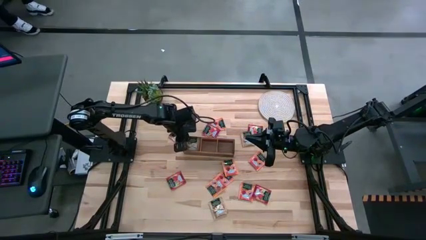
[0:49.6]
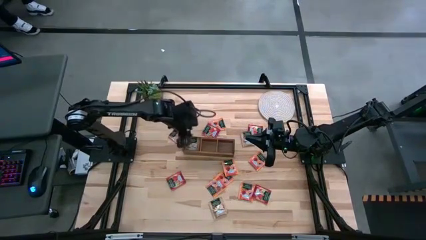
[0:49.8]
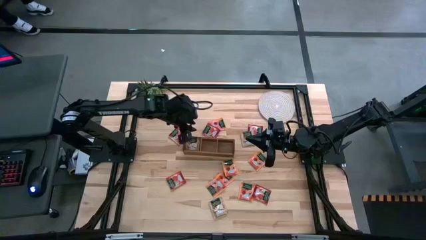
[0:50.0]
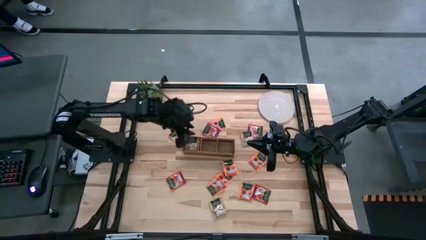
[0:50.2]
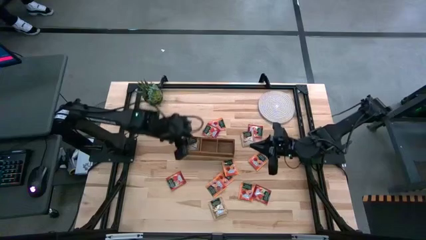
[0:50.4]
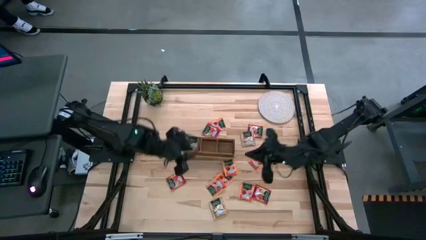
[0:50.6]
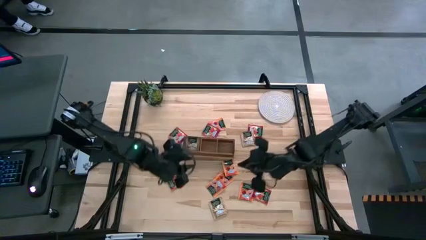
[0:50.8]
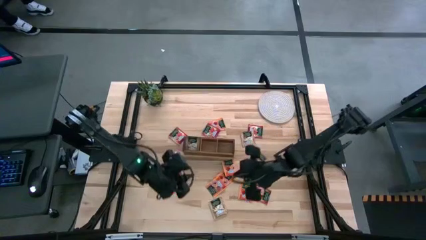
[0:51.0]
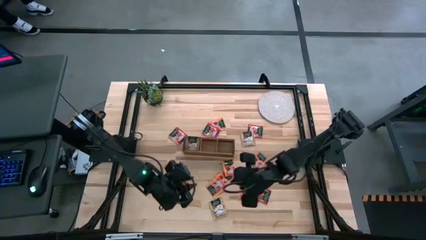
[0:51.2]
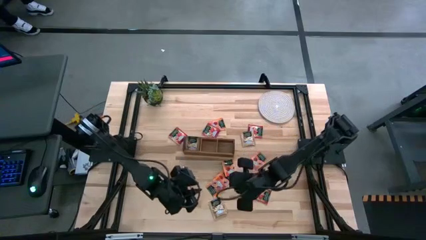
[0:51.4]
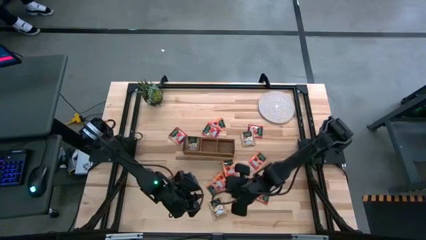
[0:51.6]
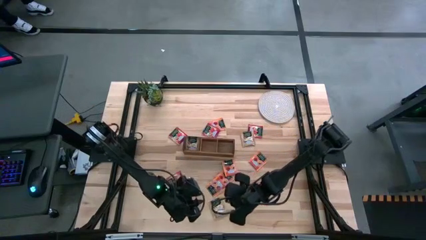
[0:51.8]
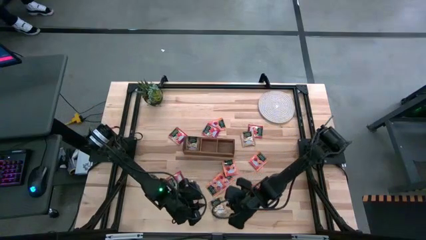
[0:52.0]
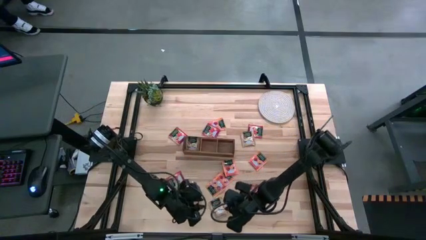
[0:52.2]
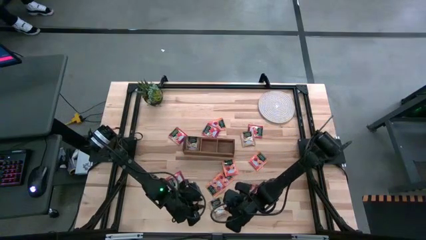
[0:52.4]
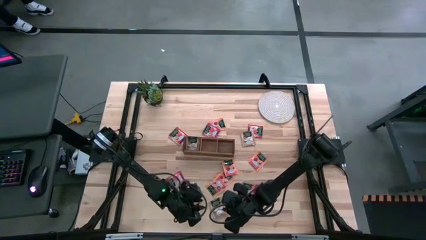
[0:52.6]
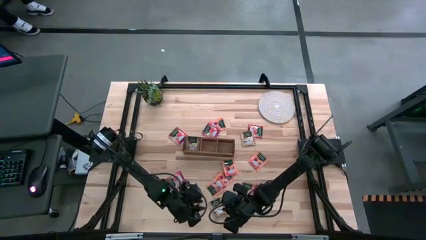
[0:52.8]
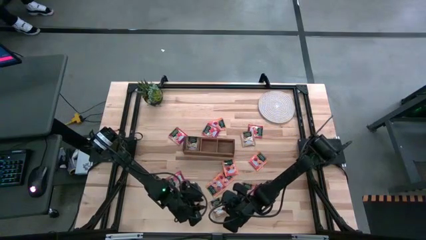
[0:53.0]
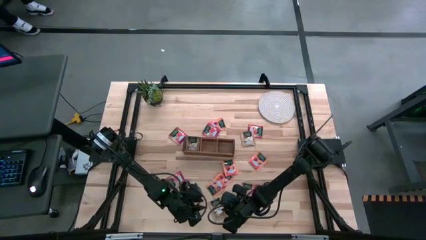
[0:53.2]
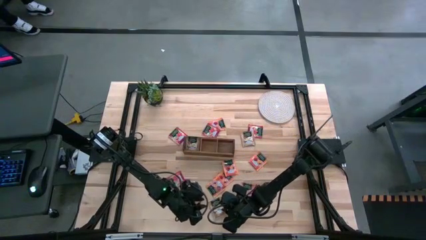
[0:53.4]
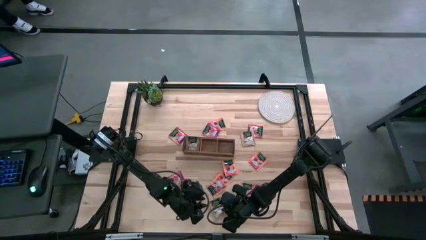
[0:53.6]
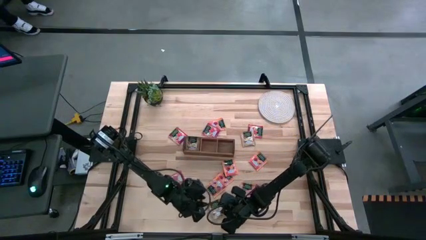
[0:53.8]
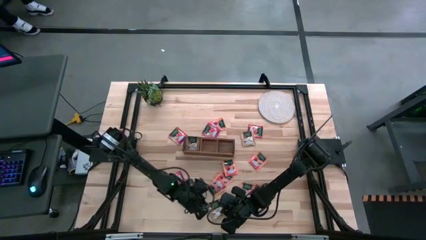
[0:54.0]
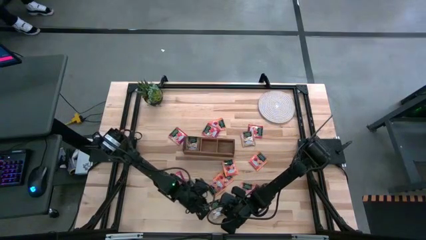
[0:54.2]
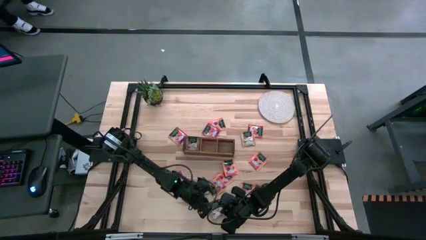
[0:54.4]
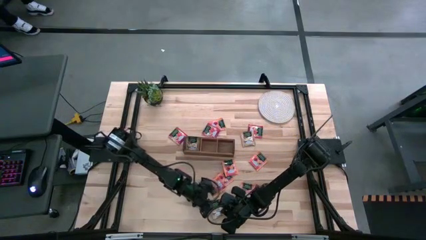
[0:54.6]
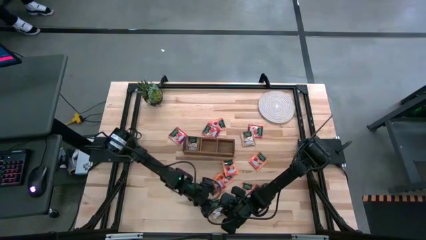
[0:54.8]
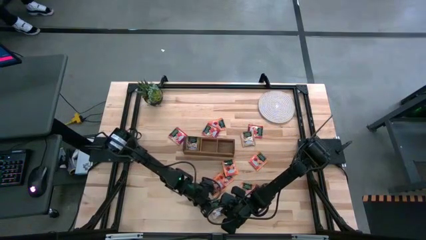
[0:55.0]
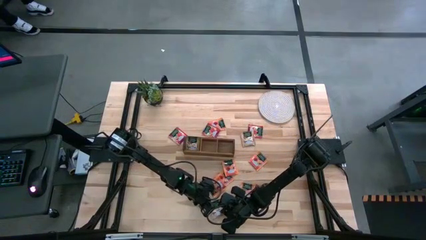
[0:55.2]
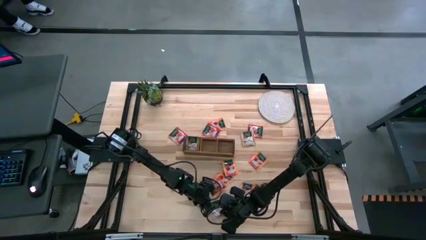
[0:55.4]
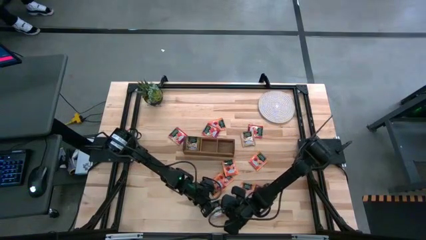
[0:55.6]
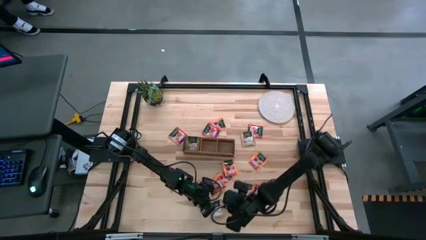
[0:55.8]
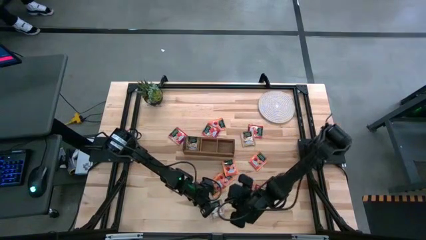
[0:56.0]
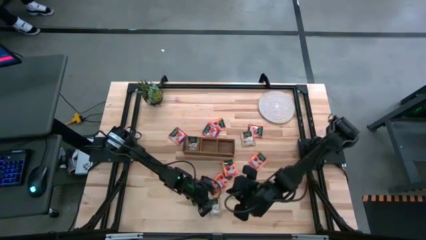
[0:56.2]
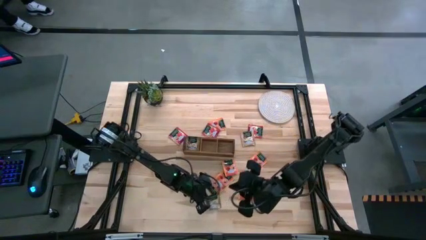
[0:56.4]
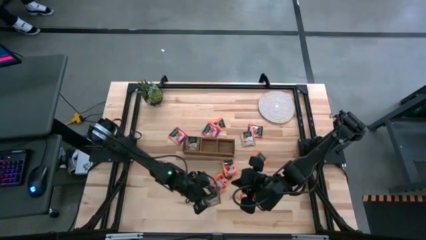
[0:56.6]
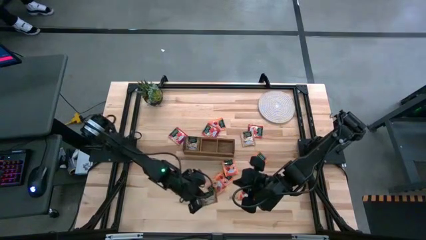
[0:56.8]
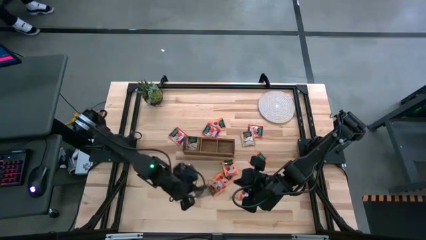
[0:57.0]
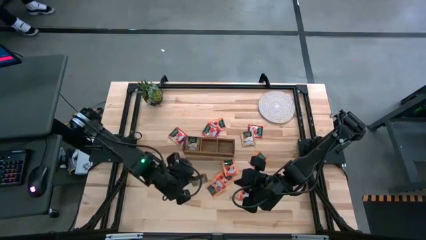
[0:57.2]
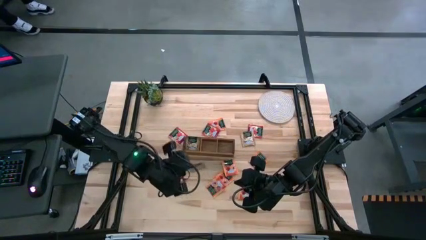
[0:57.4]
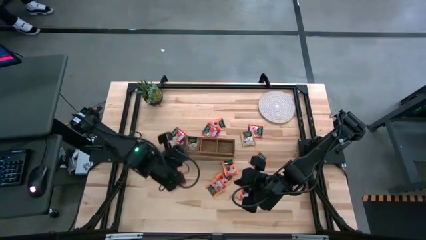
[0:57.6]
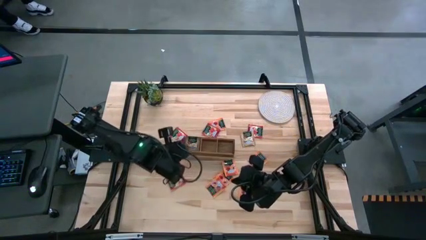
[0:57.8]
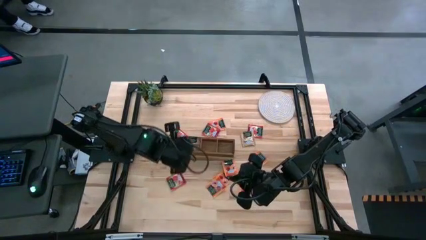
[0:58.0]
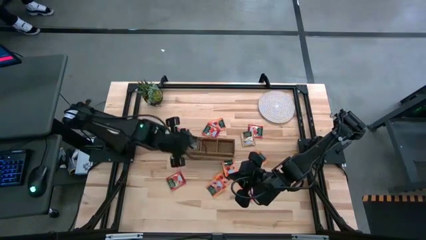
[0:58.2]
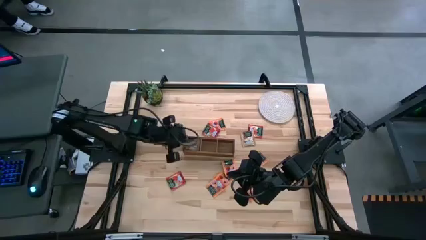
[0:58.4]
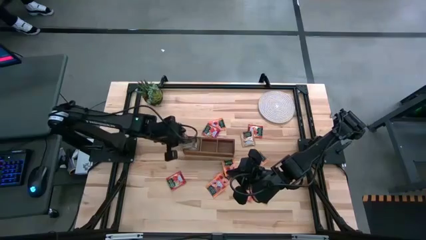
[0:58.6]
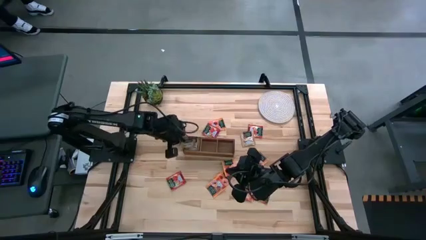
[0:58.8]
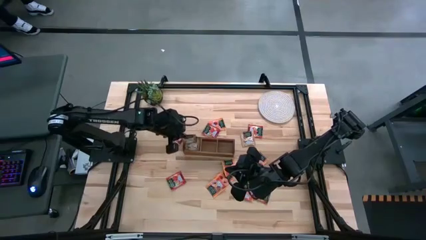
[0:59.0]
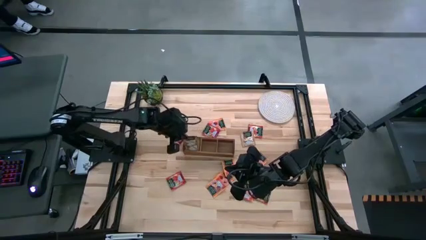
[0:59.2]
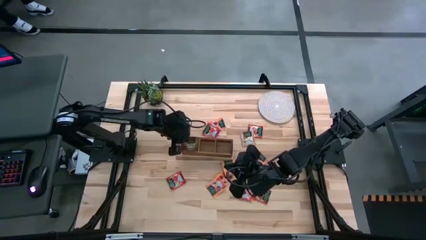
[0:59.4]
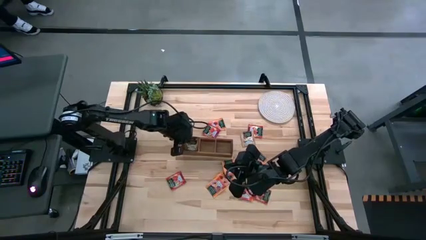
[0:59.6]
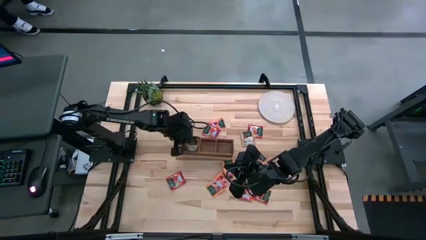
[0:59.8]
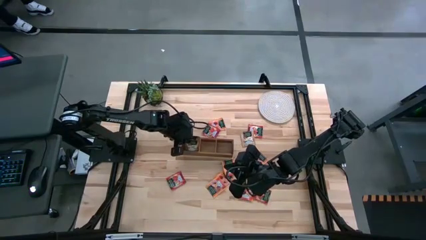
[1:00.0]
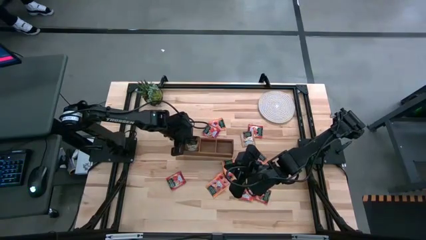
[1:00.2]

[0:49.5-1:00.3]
Task: Pick & Place Tea
Put the brown tea bag into the left section of the brown wooden organizer
